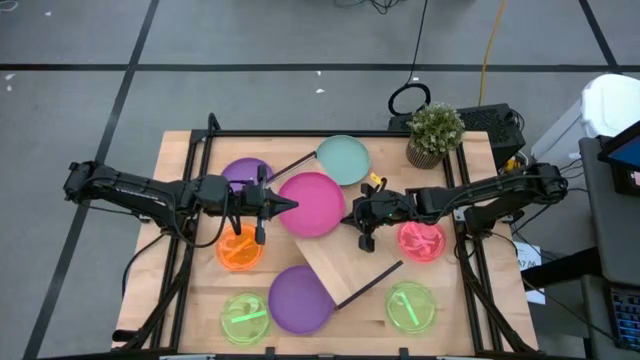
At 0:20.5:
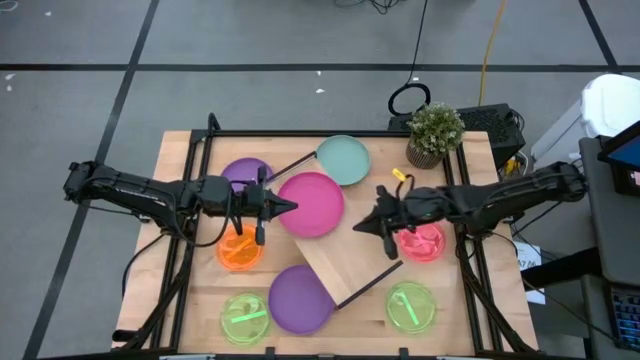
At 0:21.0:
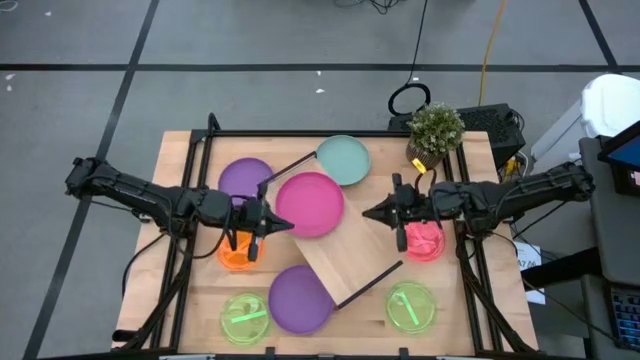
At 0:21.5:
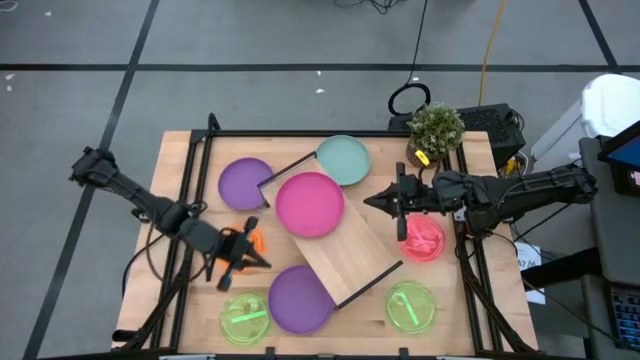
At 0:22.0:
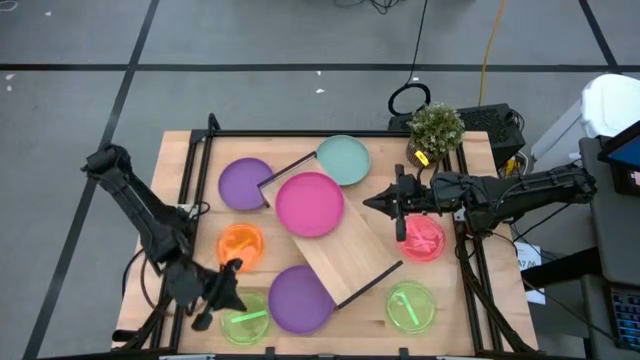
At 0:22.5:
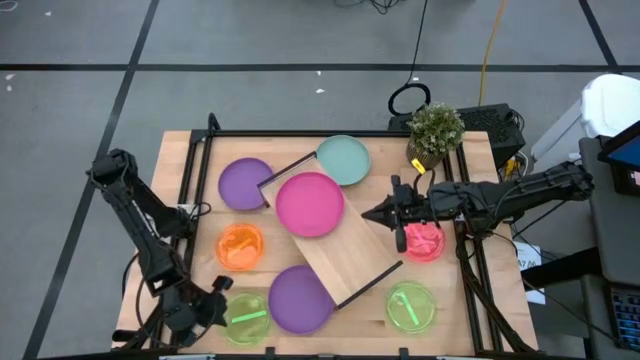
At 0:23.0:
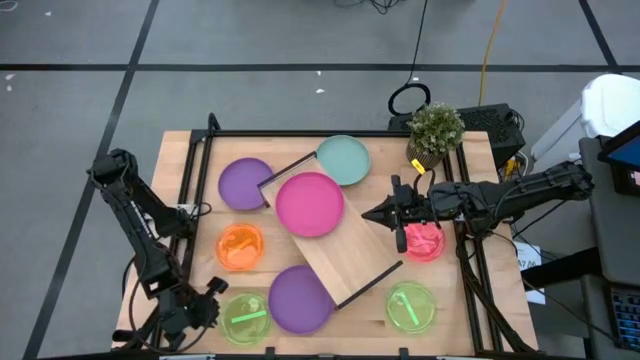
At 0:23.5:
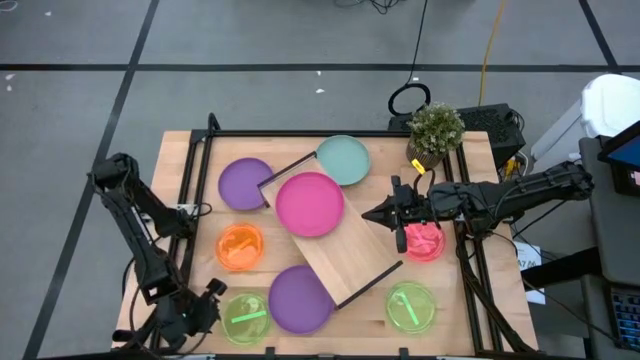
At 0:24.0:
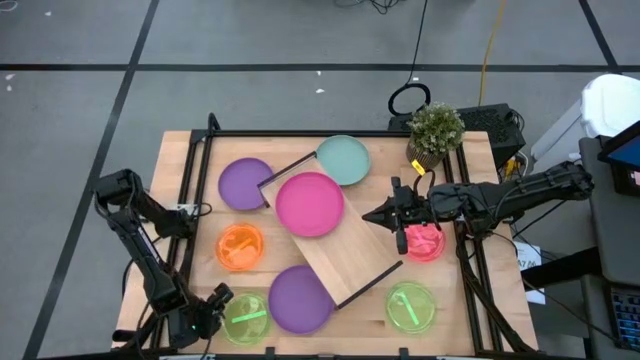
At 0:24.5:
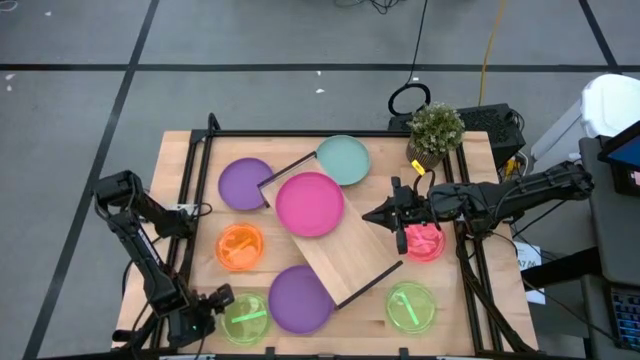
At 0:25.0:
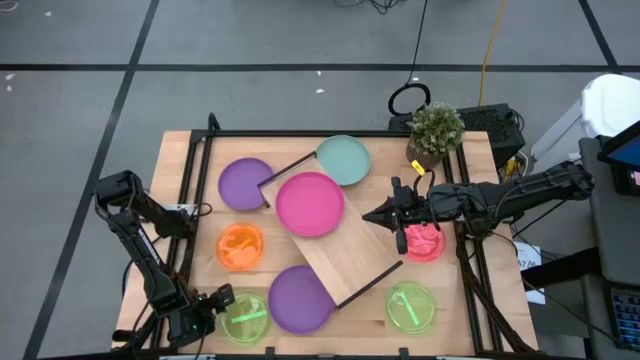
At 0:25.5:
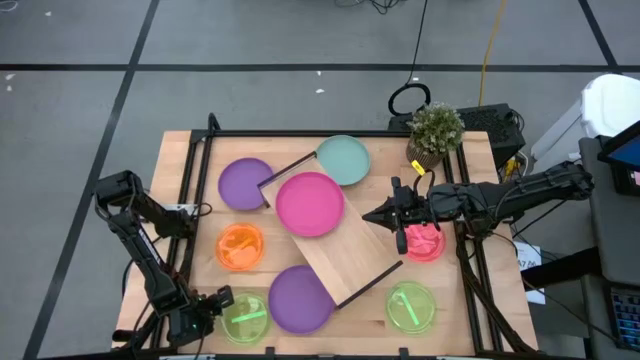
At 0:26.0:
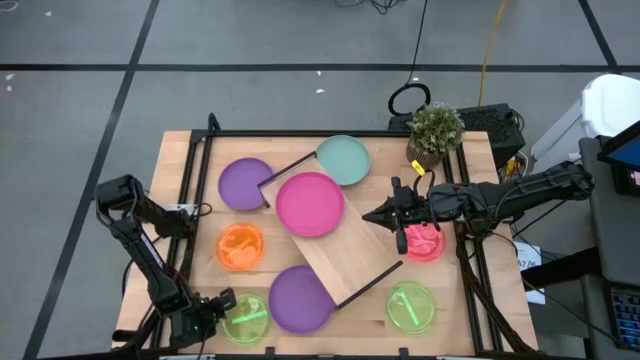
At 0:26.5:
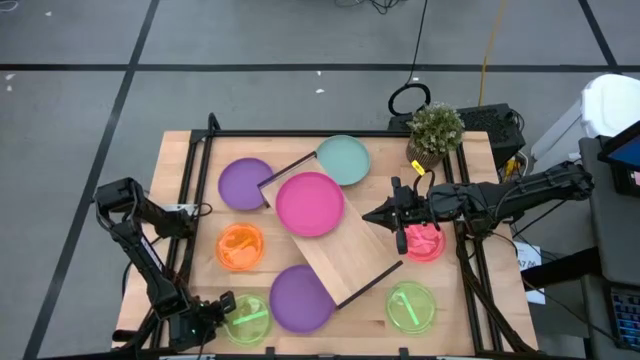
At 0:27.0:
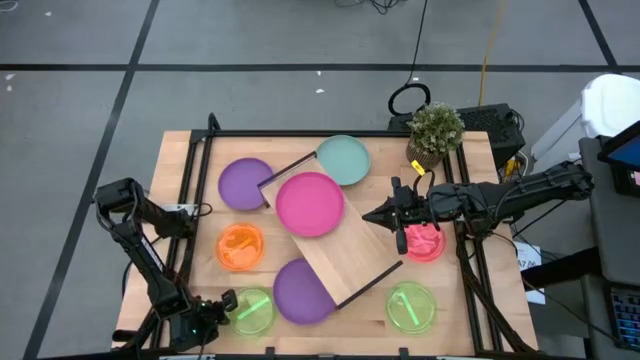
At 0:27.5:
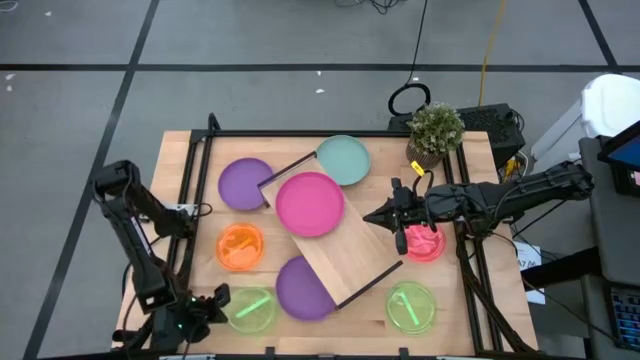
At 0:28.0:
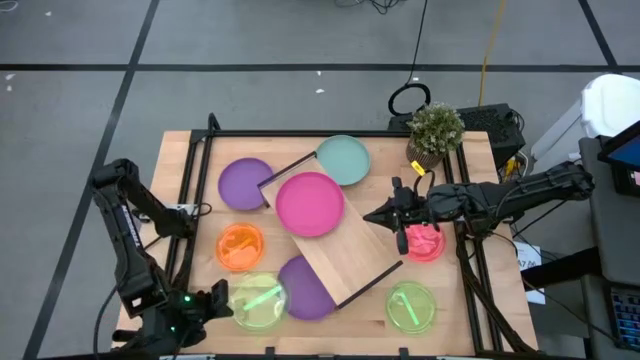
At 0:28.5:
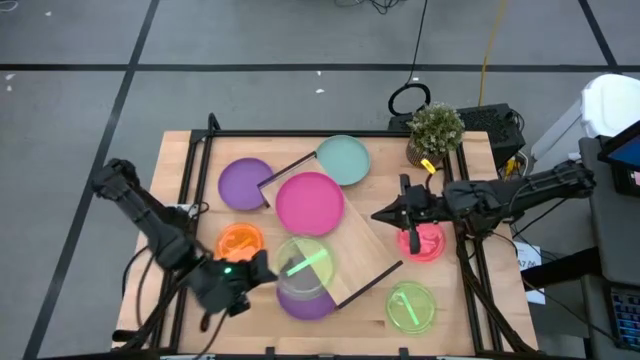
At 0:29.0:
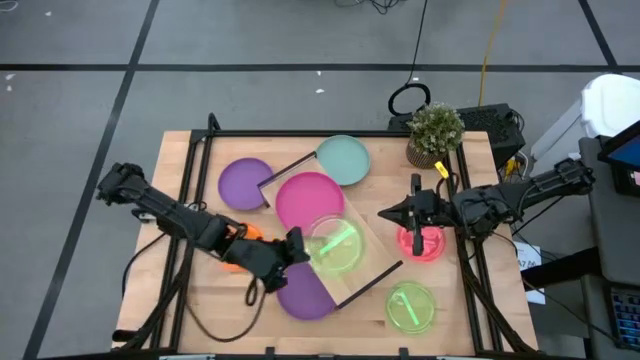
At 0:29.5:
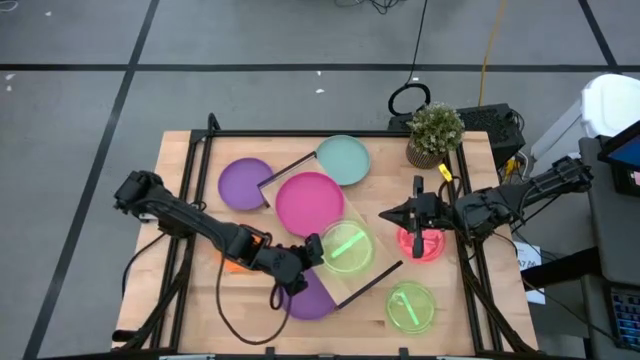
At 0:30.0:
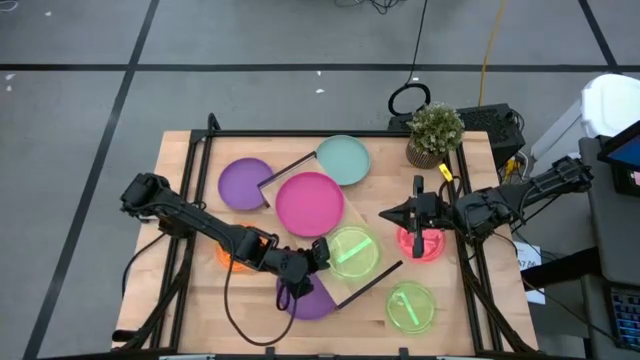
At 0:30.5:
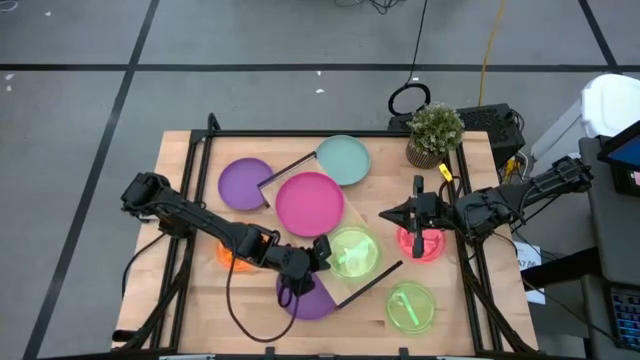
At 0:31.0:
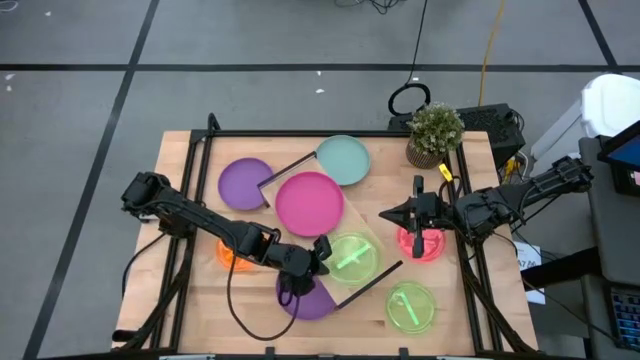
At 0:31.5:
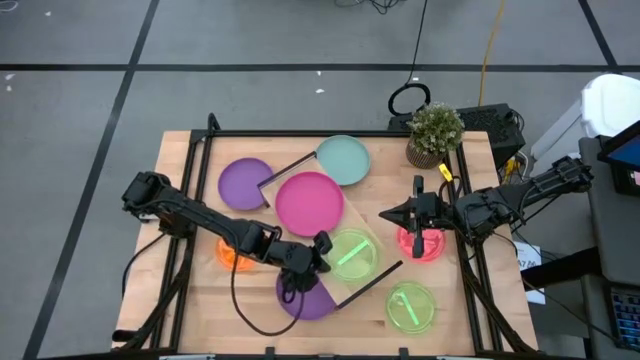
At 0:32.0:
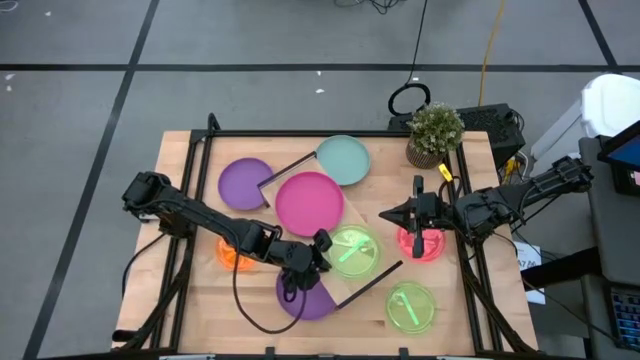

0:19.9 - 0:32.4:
Task: Place and stack plates onto a shelf
Put the left green plate on the shelf

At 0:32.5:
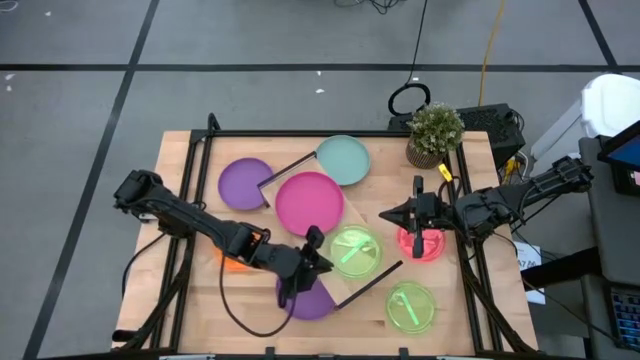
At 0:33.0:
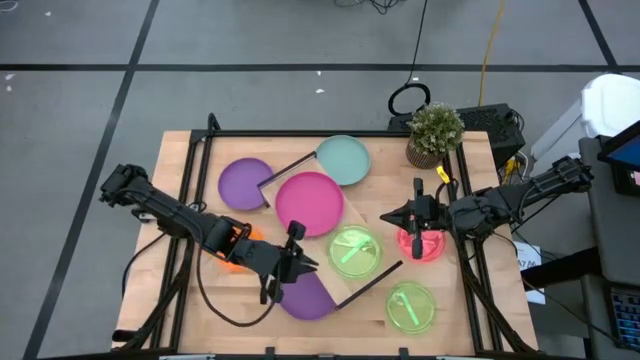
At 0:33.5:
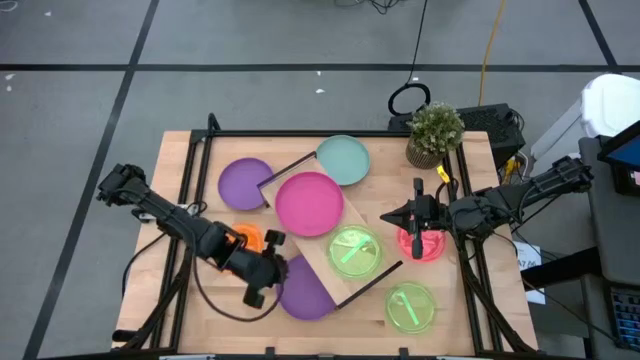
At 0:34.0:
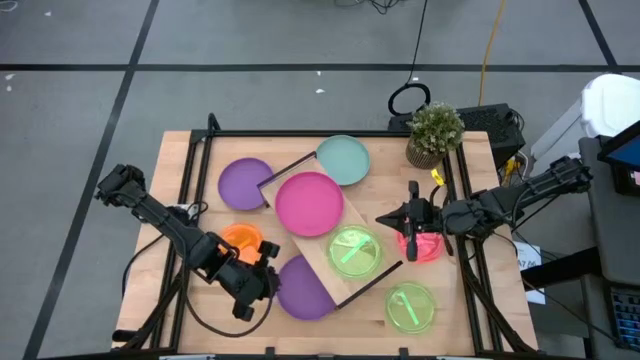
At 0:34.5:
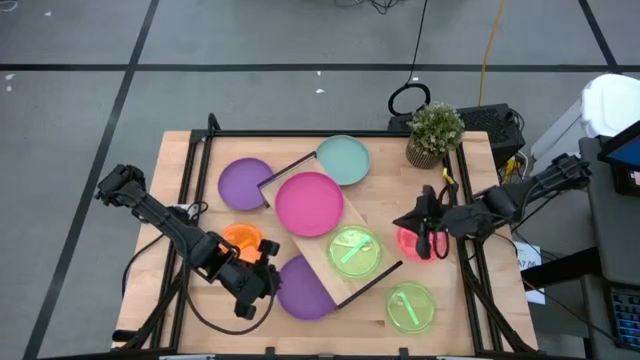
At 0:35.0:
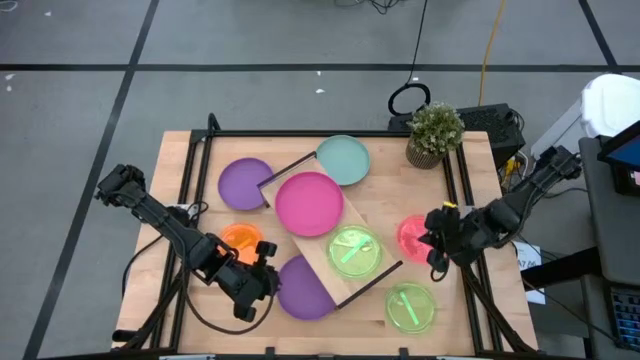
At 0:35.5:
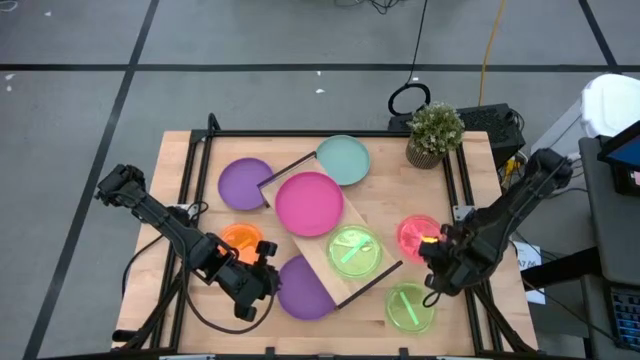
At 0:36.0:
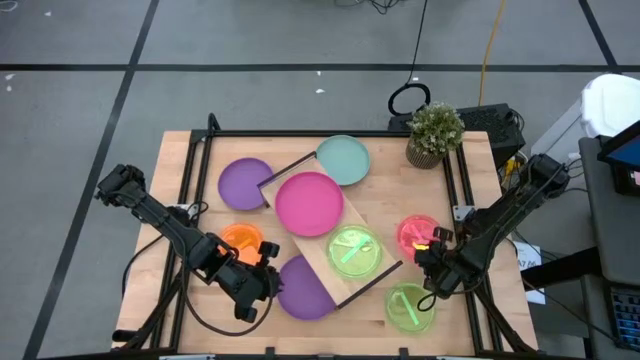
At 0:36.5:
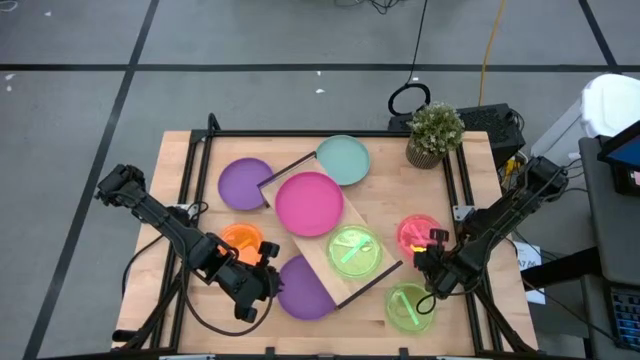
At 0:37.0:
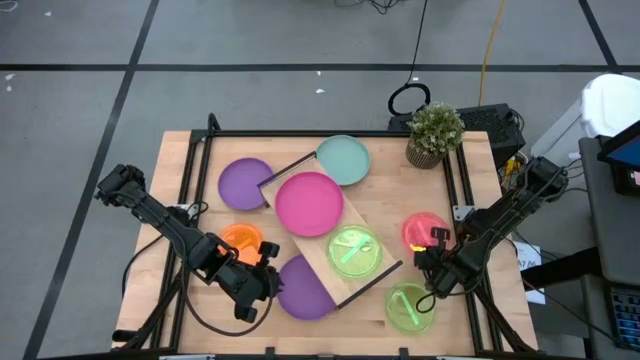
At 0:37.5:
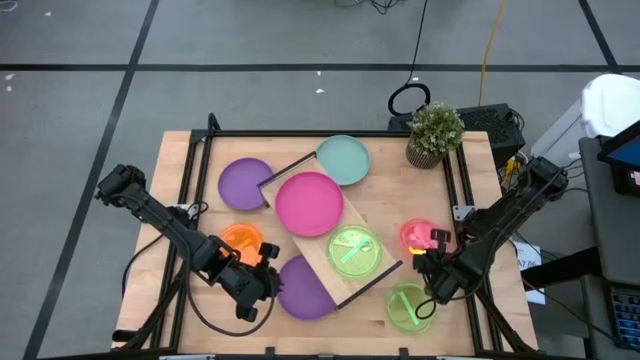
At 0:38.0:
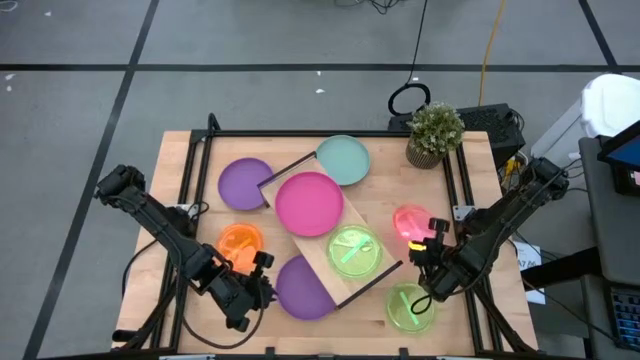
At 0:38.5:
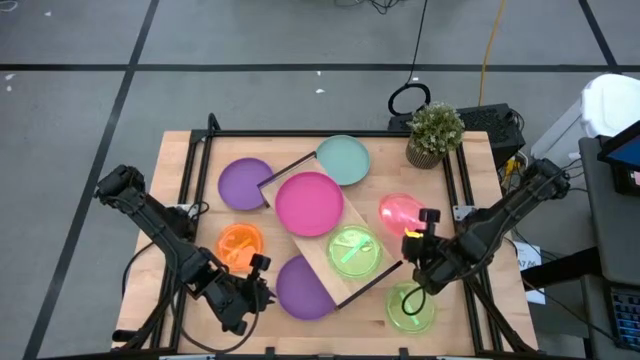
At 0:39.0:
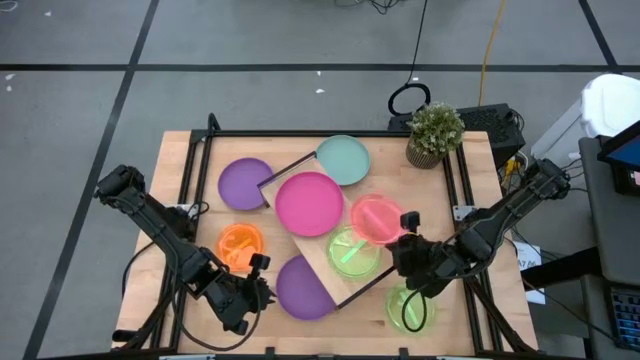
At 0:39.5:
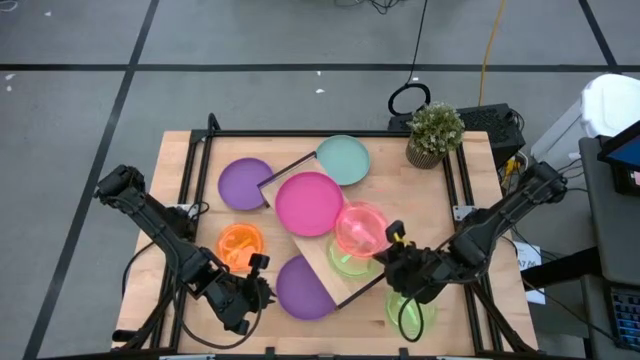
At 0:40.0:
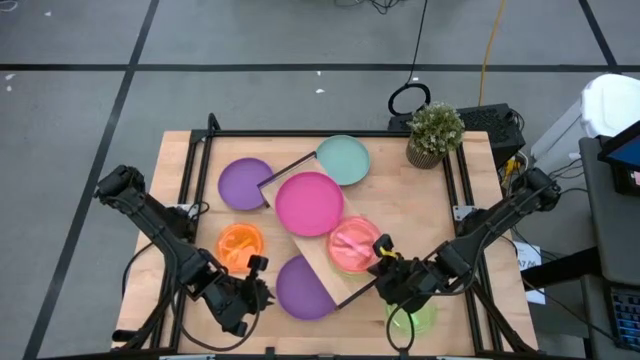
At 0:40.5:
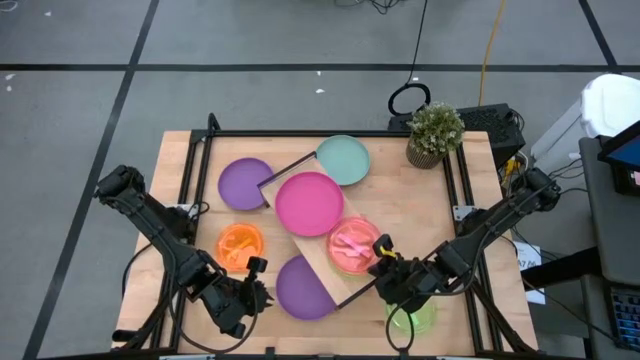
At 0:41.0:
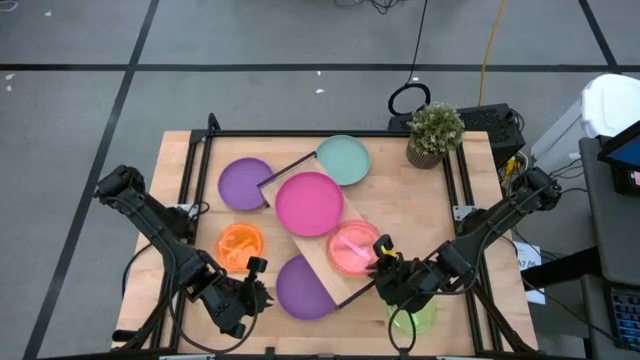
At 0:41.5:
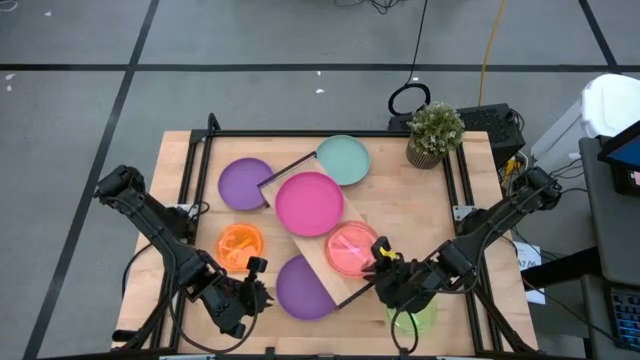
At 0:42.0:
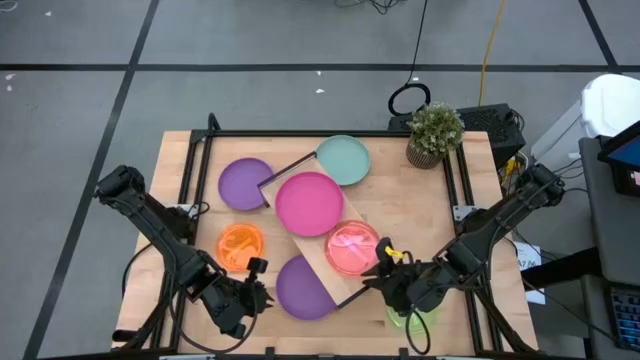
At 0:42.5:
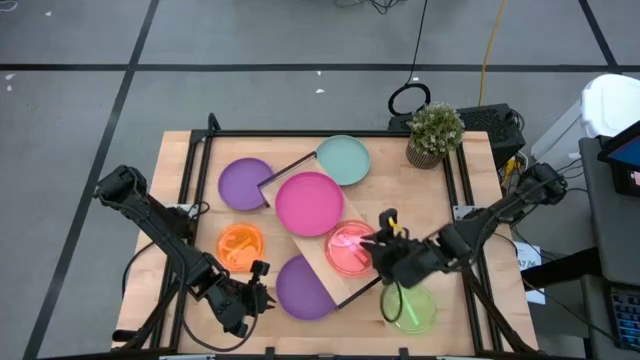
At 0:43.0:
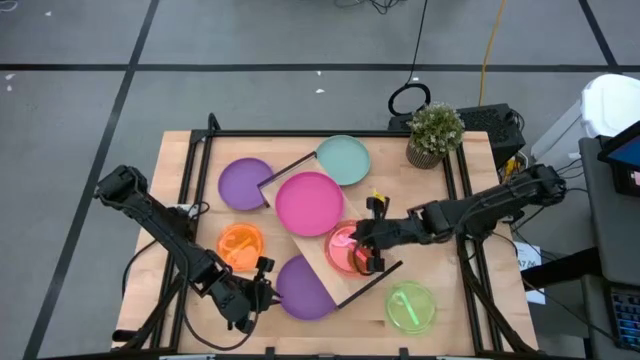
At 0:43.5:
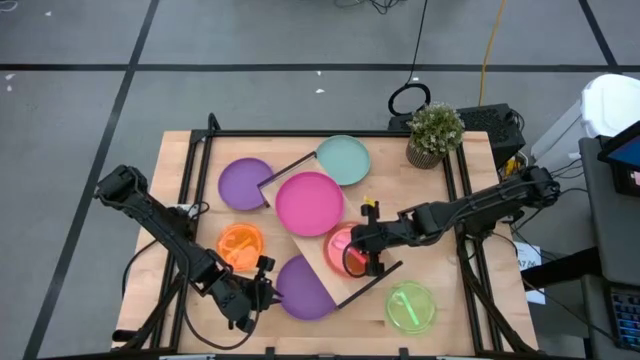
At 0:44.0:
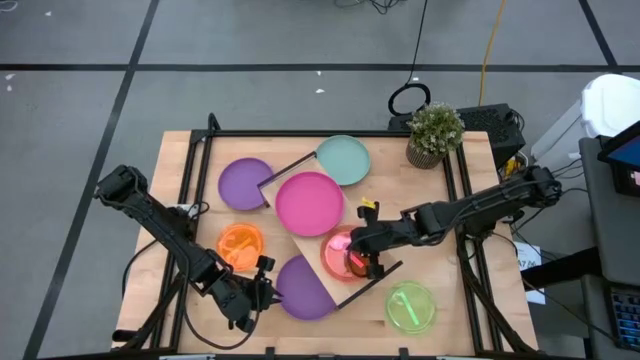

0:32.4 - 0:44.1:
Stack the pink plate on top of the green plate on the shelf
